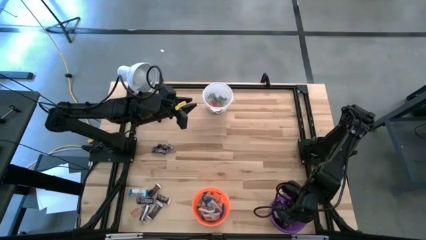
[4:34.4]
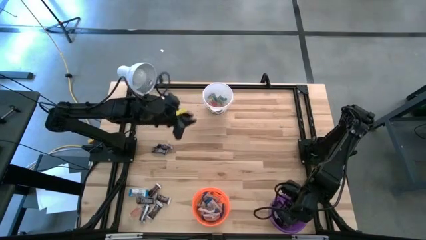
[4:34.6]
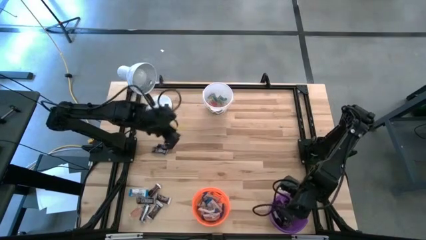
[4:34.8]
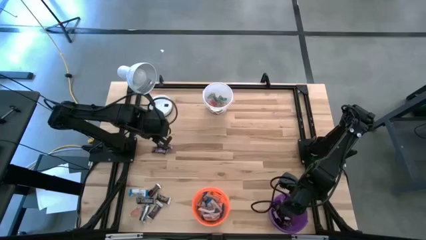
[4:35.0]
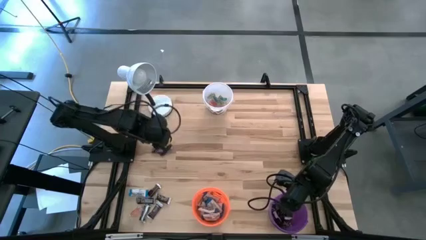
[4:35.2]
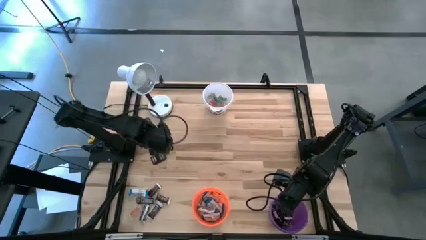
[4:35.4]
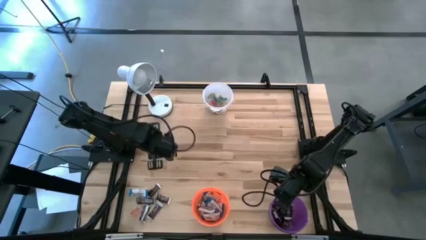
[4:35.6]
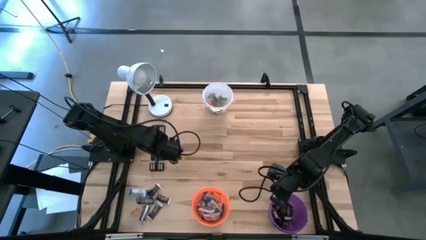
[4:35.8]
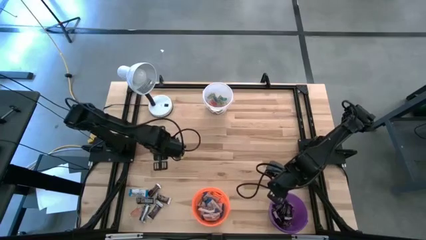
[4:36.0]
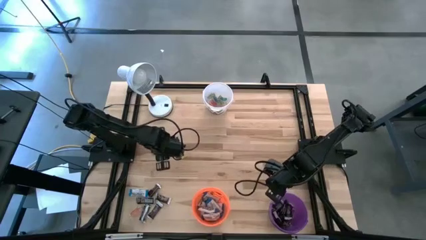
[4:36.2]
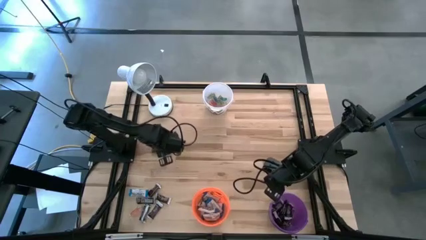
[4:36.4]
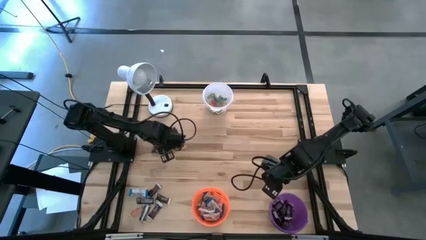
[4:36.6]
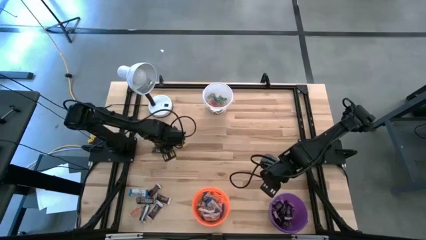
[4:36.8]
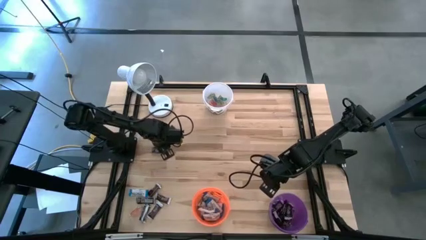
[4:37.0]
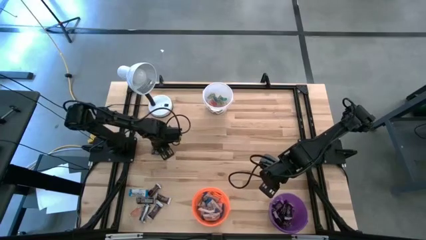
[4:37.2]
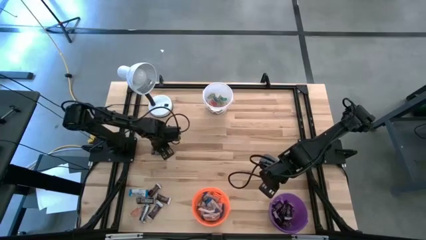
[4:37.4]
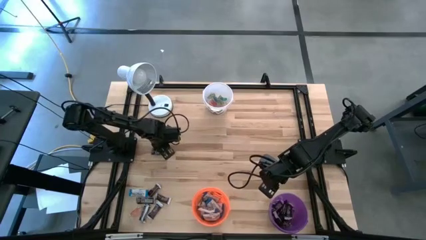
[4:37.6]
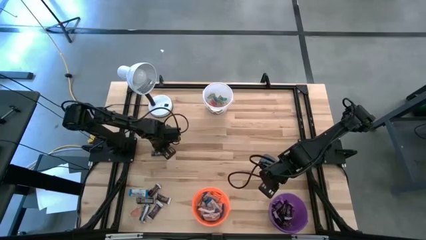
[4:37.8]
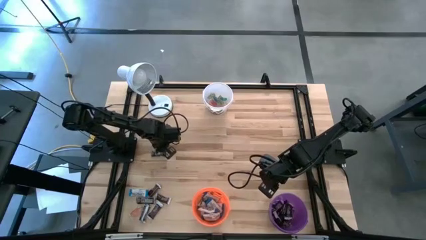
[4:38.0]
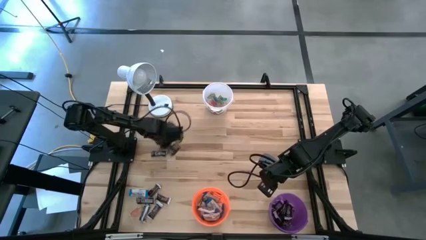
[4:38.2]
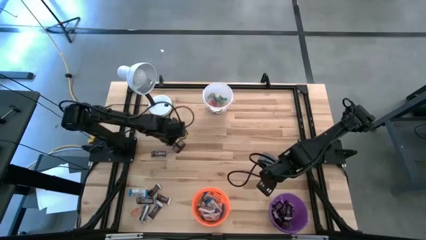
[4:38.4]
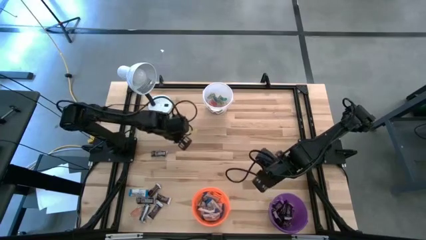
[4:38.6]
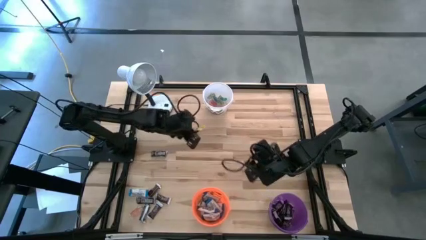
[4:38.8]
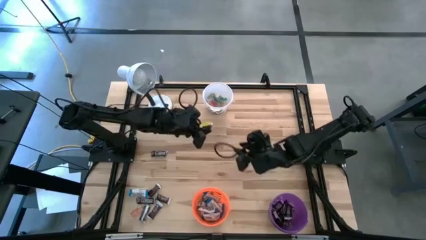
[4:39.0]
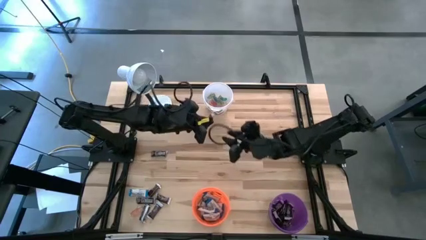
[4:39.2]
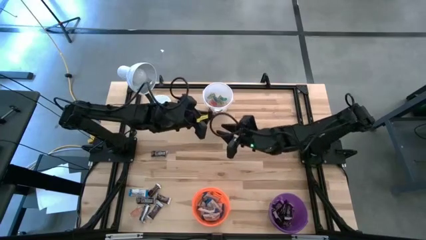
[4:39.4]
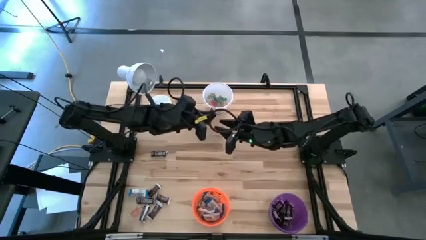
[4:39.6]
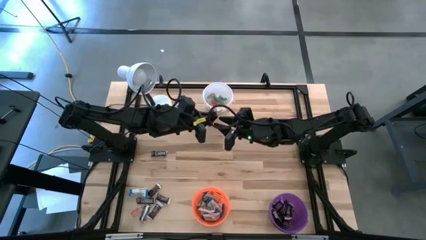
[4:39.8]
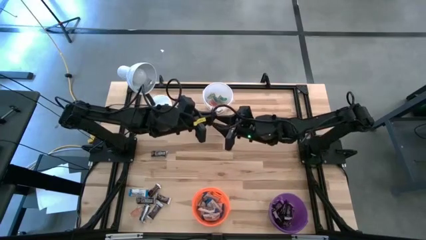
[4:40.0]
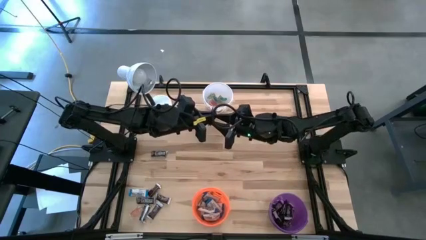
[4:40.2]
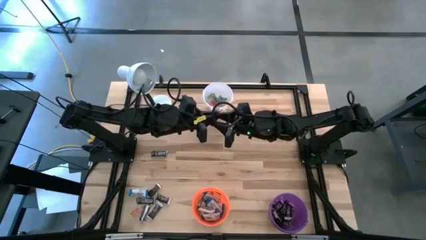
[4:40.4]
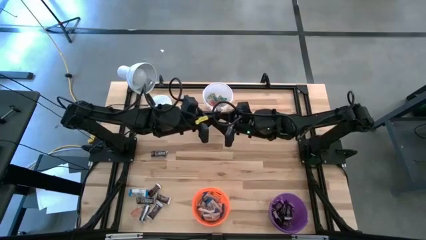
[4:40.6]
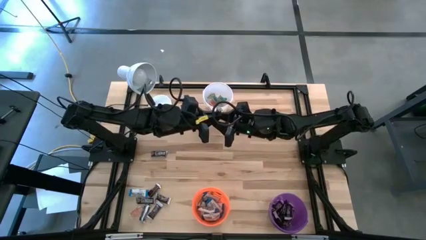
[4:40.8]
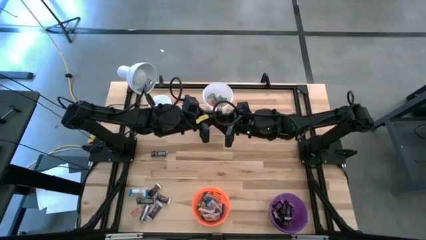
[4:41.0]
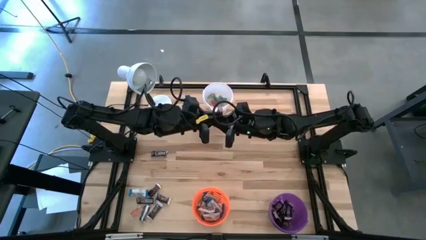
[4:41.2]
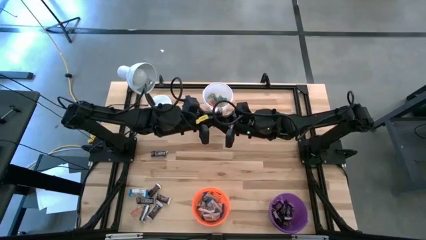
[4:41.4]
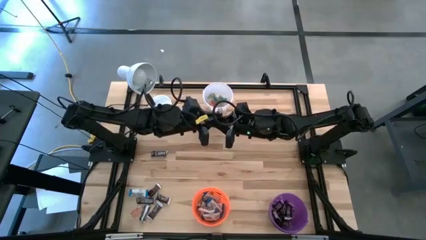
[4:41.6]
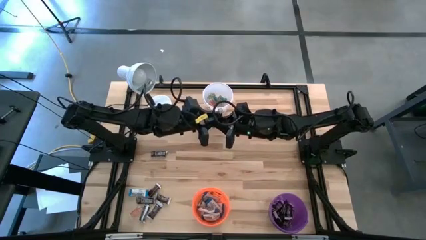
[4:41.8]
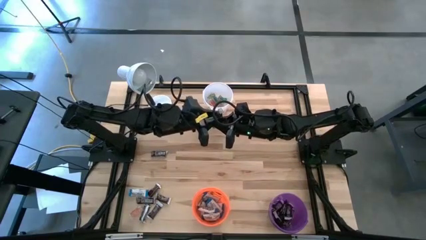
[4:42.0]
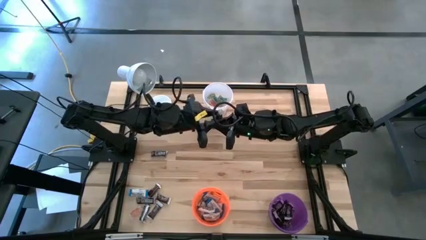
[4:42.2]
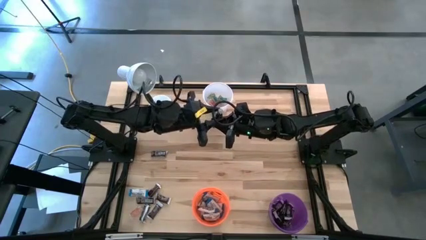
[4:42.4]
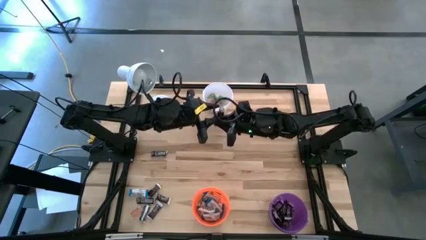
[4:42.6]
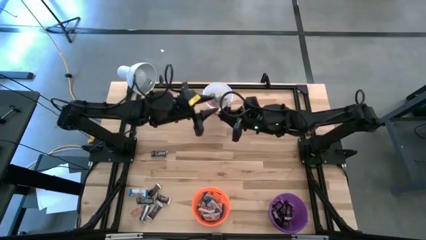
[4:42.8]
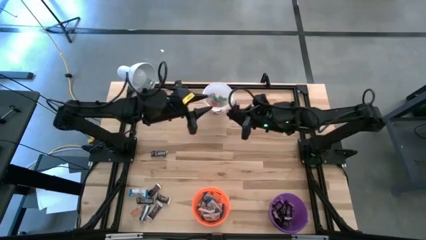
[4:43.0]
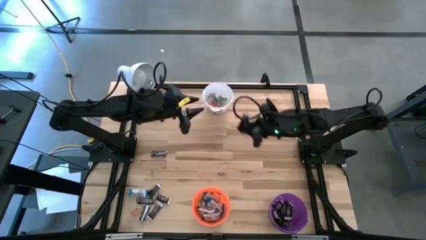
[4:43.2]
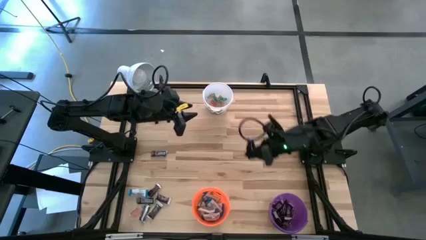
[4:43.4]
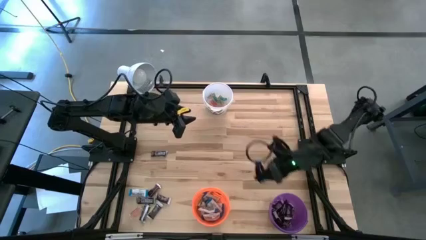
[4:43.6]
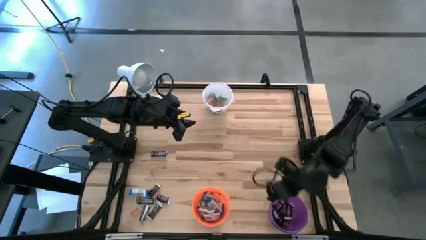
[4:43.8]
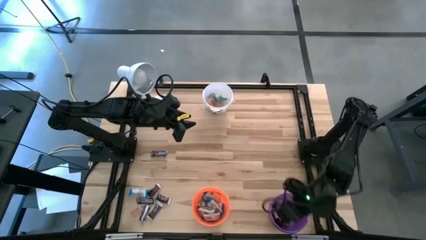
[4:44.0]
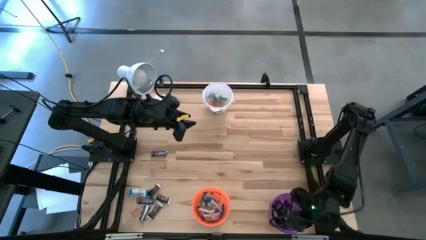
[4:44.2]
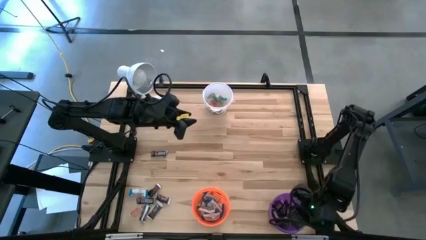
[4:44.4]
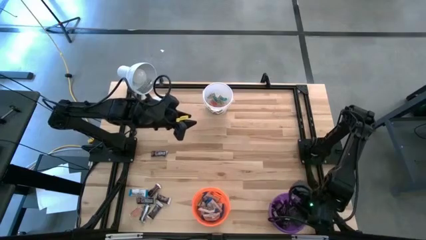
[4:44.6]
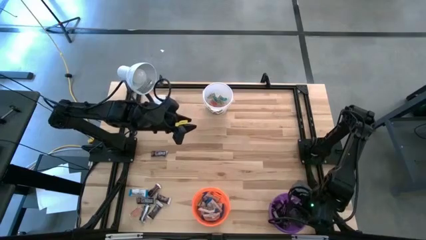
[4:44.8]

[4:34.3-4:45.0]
Task: Organize candy in baskets
Put the dark brown chocolate bar into the dark purple bucket

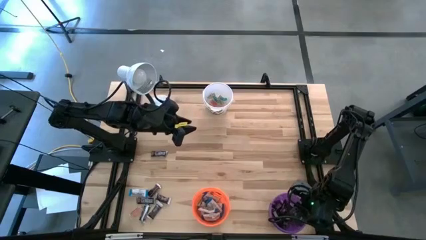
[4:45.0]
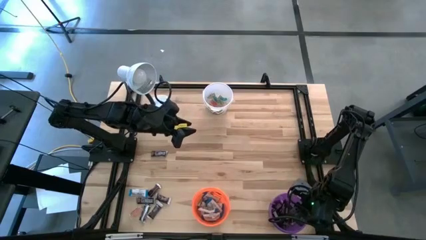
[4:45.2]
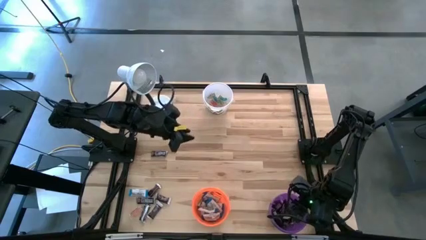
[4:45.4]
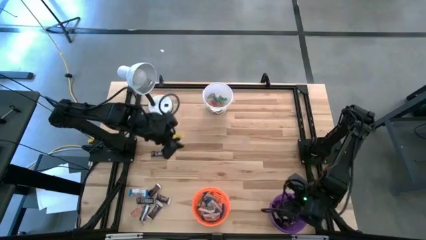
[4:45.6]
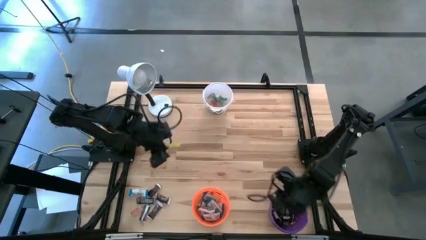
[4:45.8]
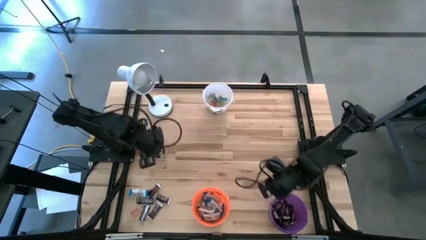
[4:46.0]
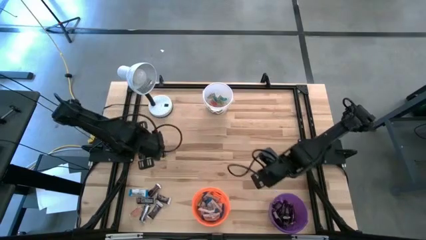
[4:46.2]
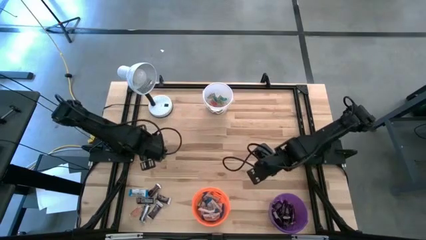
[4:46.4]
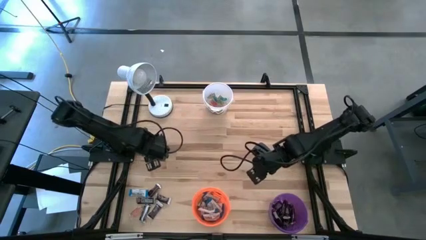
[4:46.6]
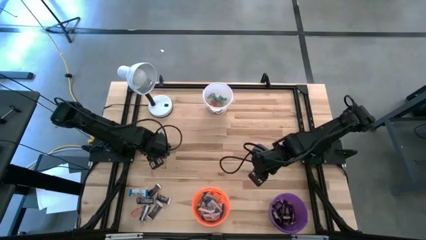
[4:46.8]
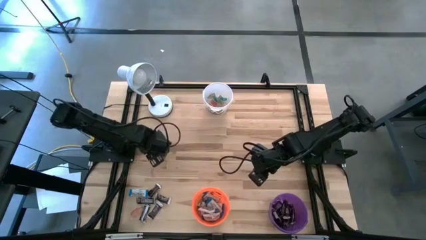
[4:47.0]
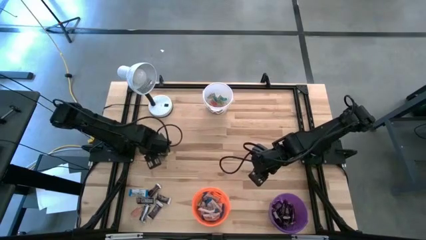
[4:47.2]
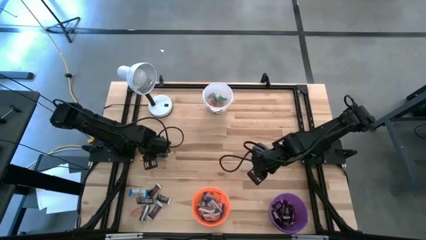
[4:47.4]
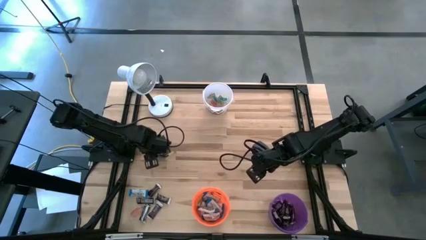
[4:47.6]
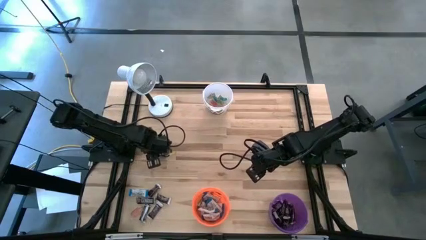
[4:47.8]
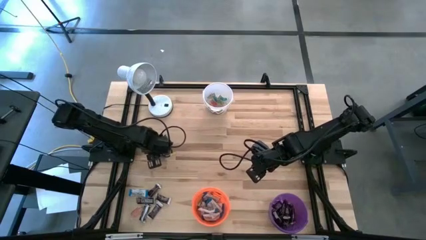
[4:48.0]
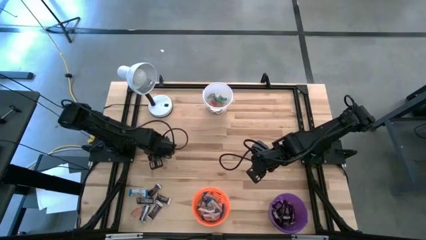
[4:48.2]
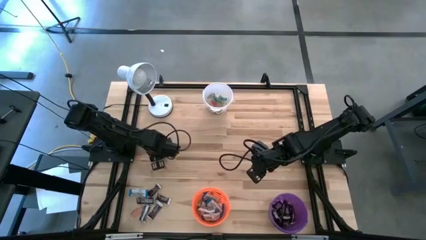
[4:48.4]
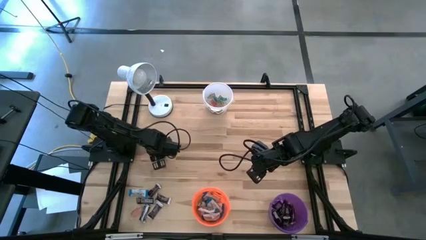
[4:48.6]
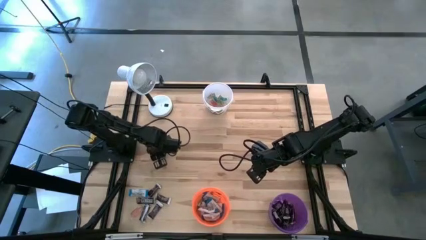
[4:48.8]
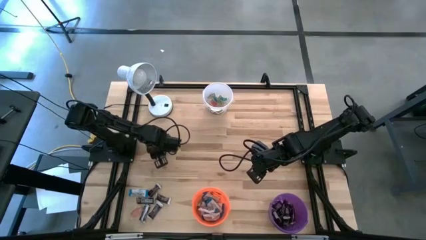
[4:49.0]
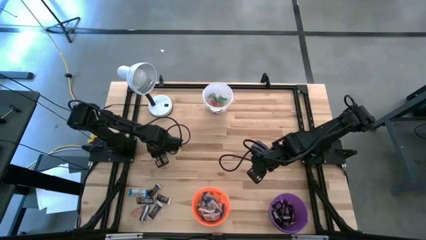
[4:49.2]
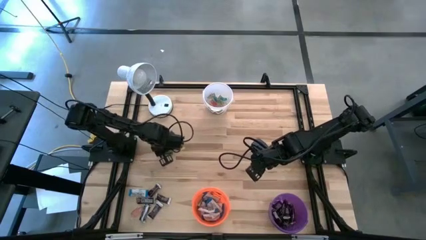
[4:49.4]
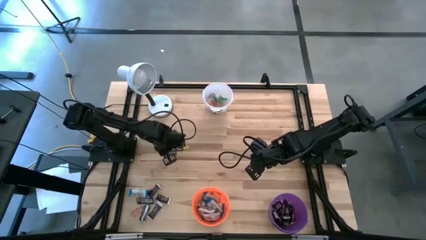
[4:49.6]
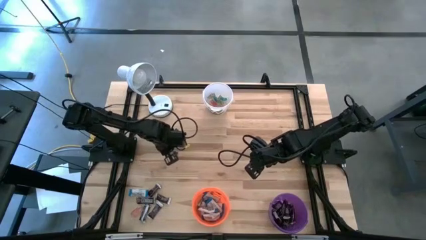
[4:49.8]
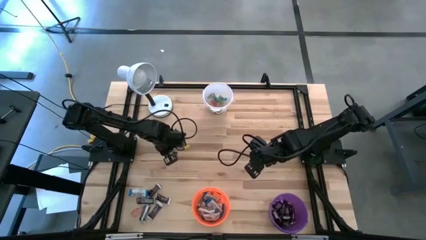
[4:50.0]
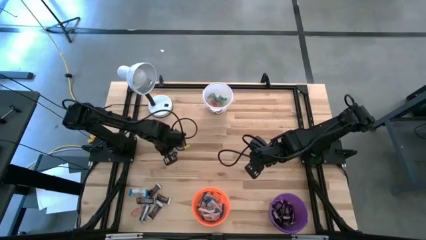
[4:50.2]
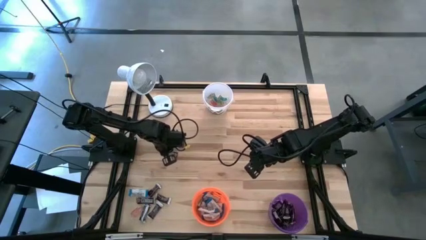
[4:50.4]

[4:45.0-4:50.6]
Put the dark brown chocolate bar into the dark purple bucket
